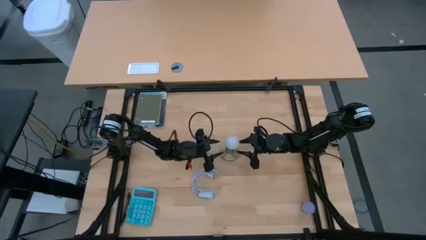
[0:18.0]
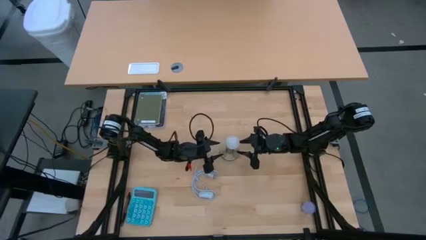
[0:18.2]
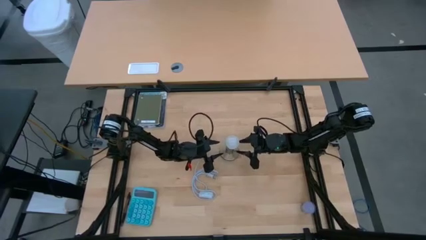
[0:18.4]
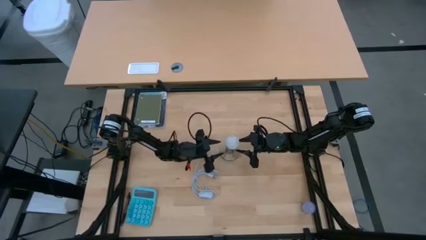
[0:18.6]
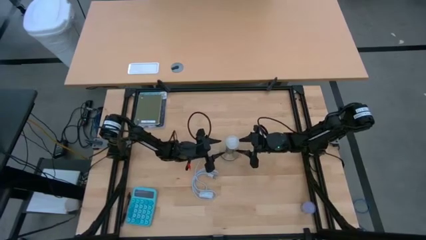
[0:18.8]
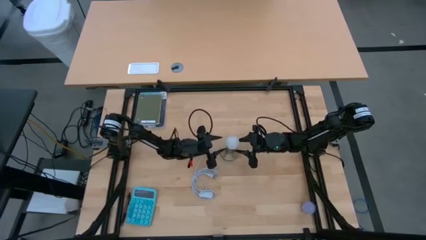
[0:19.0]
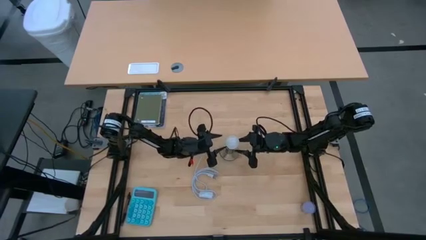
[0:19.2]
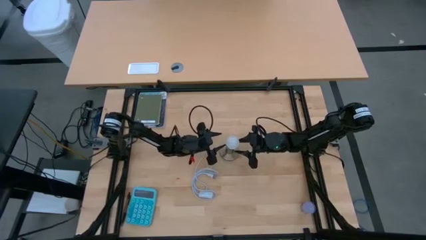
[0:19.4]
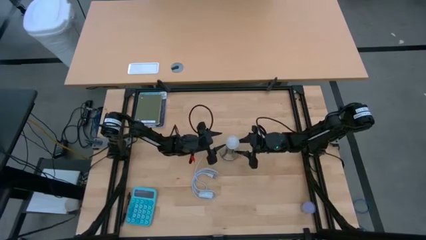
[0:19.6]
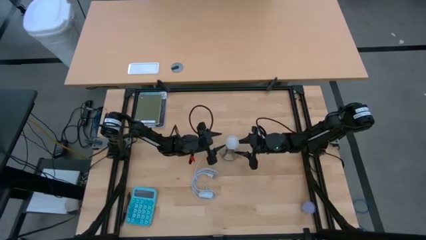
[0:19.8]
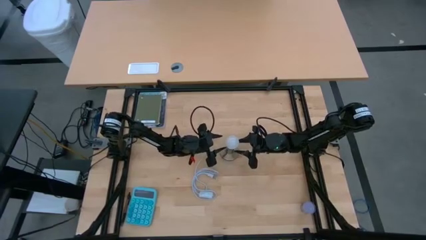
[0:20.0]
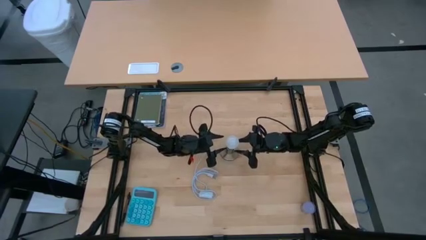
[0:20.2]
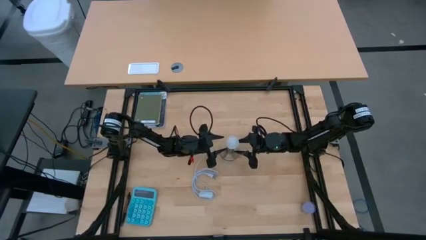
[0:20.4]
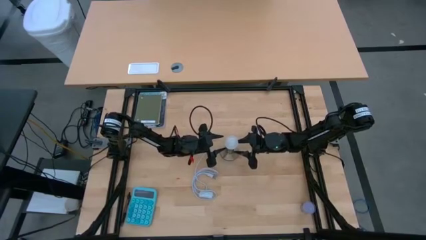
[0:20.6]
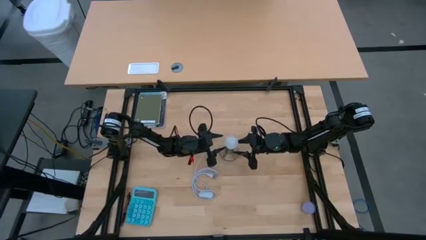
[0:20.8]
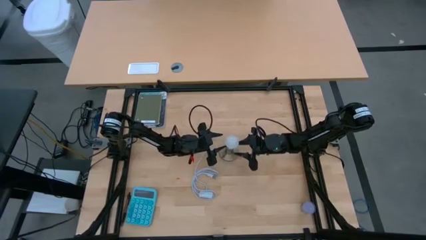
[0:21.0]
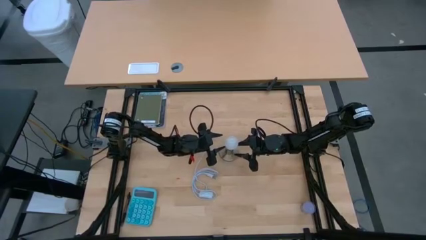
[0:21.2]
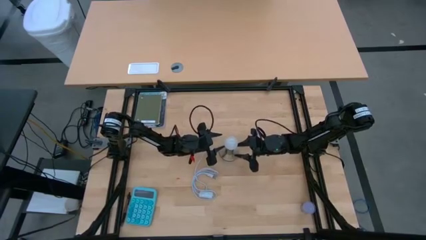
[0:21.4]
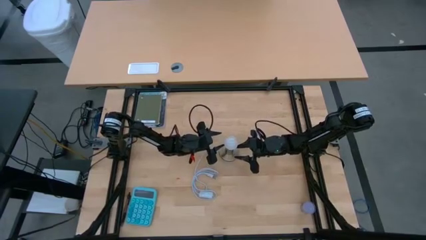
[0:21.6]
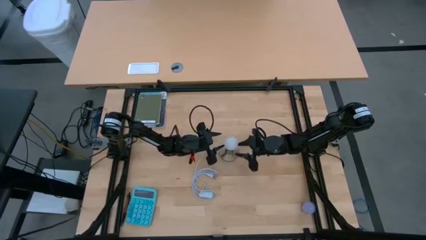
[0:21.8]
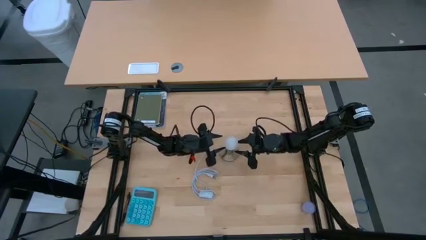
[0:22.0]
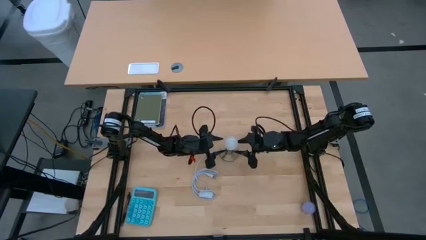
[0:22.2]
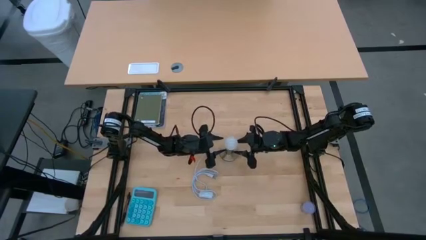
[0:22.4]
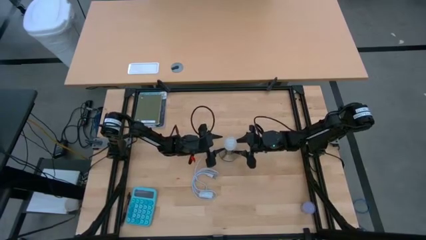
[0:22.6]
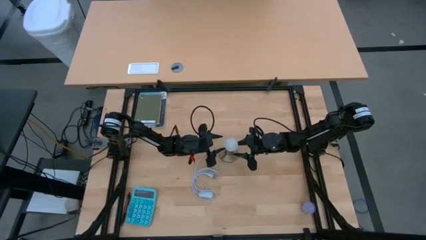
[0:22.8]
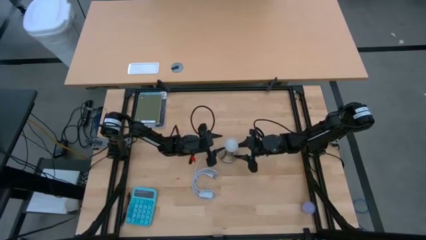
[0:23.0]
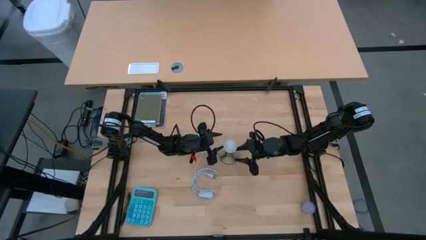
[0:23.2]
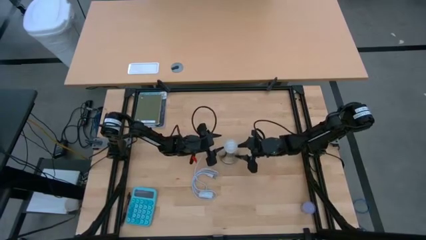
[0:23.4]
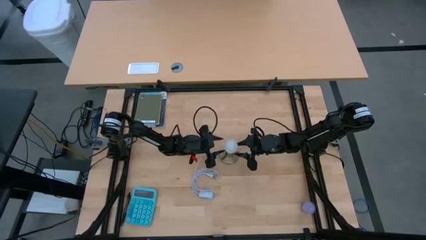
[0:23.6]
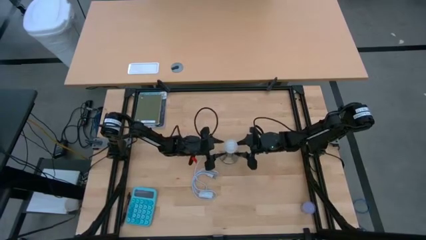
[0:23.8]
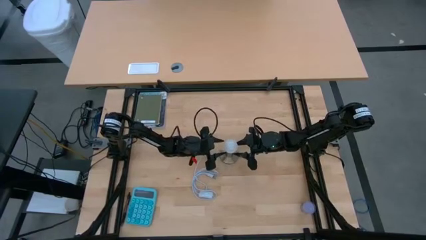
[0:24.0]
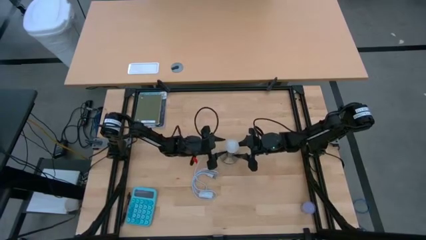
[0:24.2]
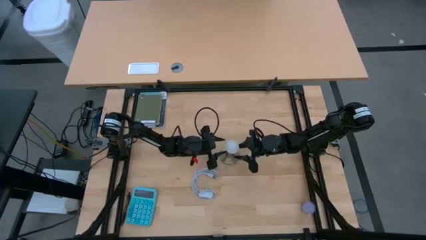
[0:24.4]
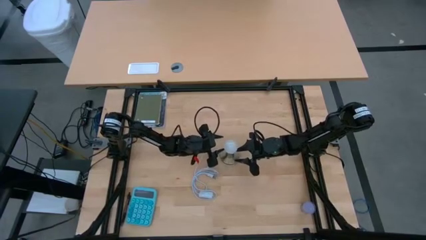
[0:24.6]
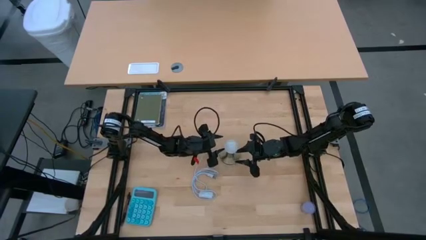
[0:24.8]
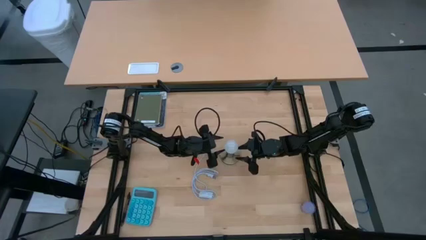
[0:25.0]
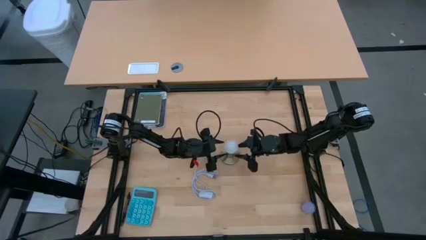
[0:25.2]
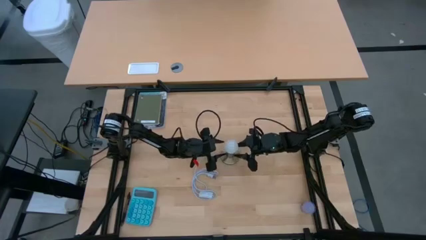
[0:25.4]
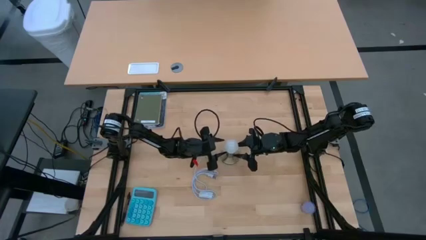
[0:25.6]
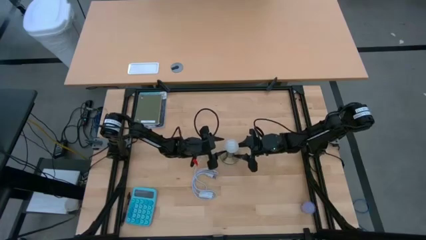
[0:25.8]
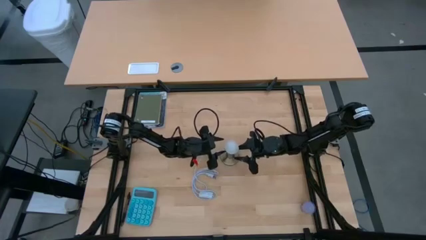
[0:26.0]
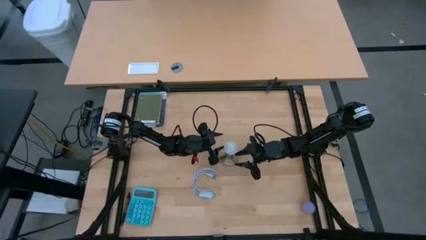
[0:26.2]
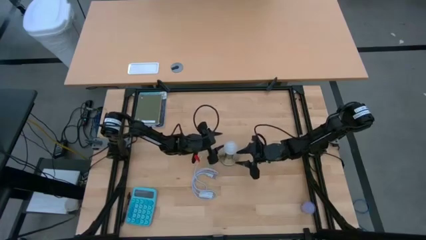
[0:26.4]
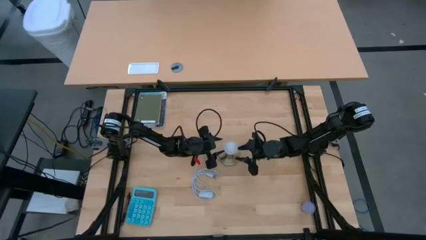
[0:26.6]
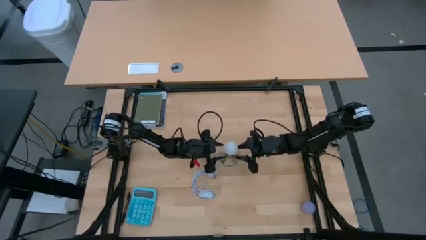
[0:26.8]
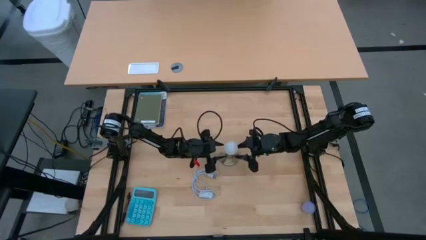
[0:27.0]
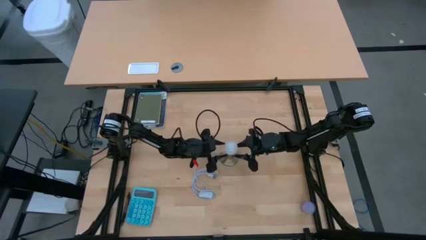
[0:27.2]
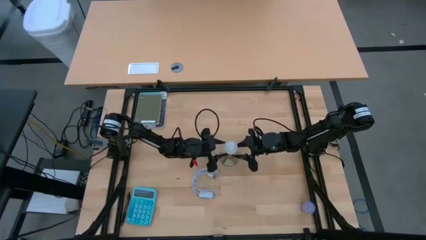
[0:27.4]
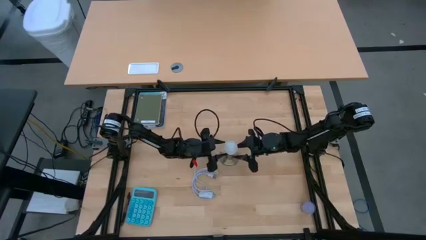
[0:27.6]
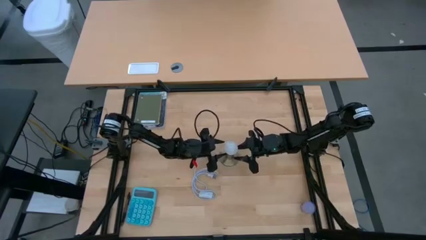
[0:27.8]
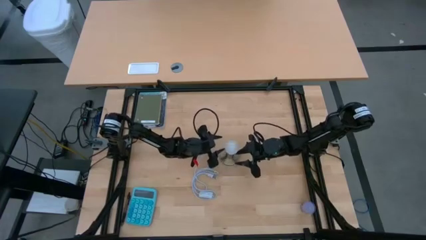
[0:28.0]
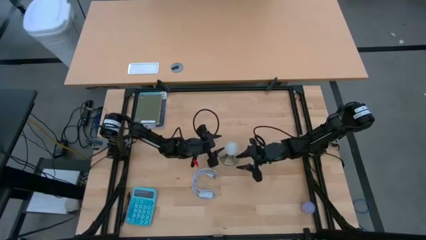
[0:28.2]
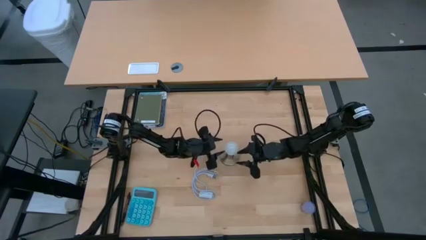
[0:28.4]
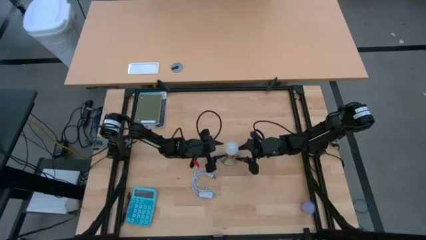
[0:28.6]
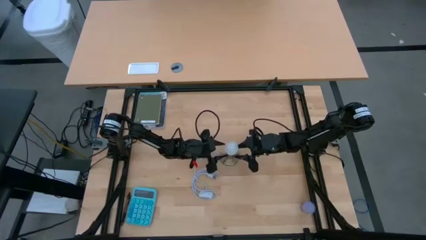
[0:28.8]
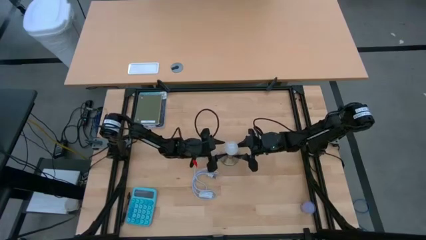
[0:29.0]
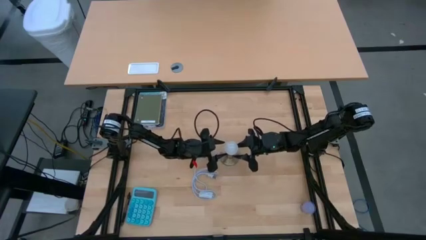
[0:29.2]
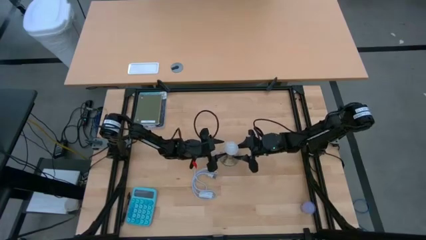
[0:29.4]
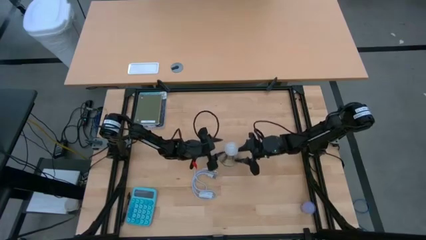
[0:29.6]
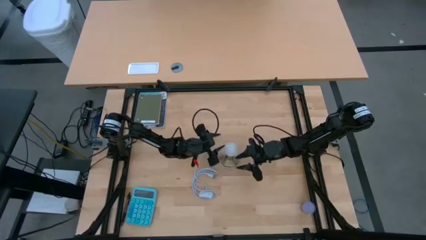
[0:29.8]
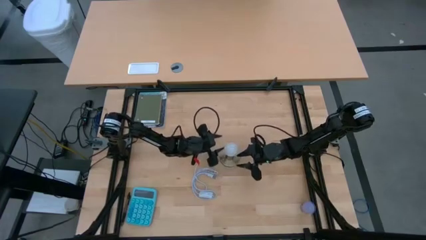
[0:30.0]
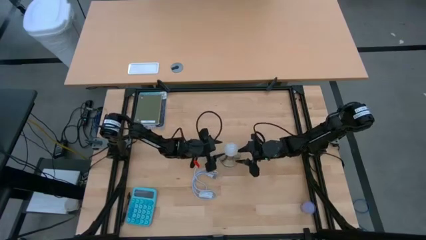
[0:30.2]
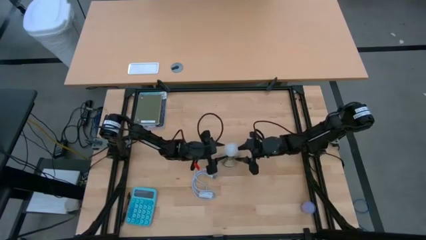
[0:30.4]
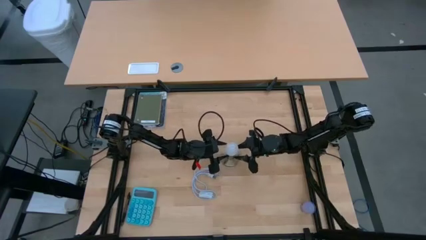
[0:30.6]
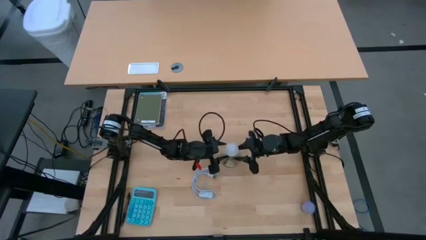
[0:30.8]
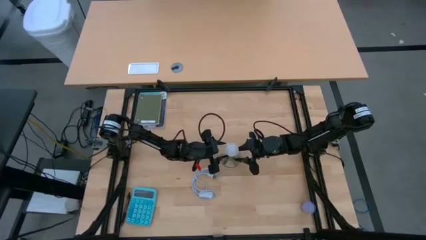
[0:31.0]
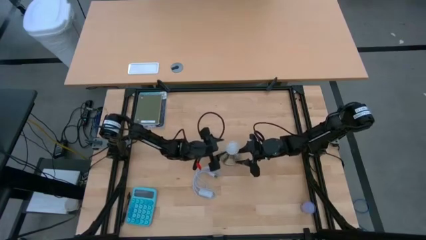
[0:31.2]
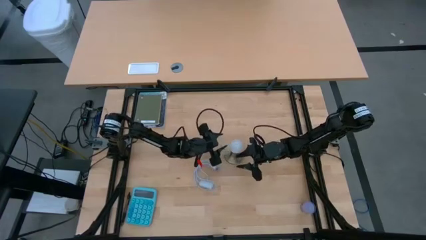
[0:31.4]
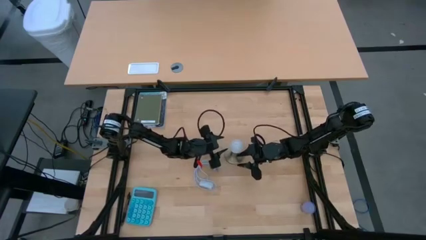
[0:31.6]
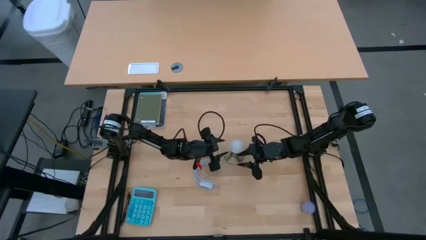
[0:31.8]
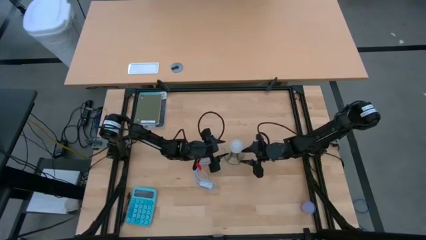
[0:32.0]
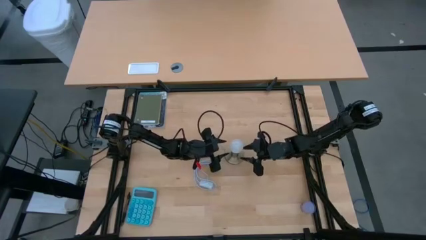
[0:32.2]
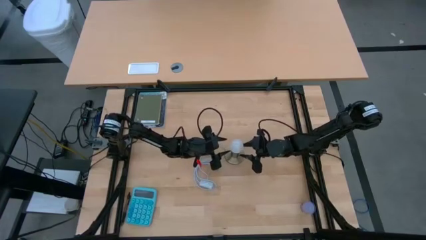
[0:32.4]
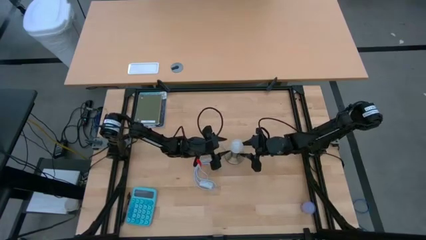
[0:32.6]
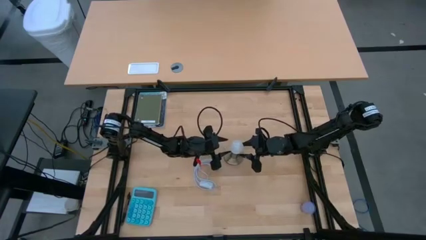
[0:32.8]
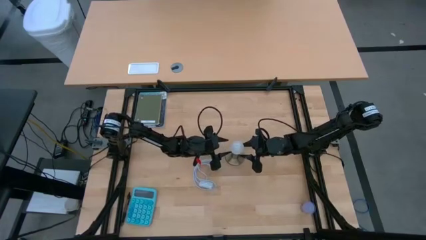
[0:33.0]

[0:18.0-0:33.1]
Task: Screw lightbulb
Insert the lightbulb into the lamp
